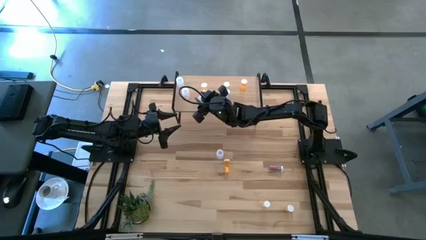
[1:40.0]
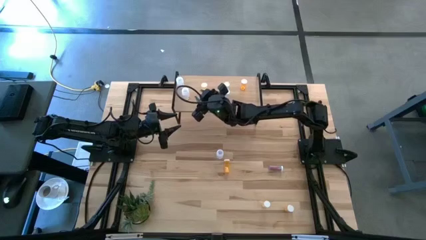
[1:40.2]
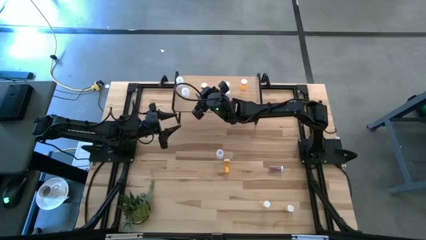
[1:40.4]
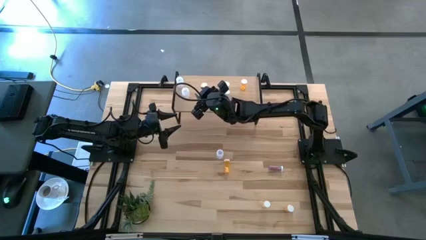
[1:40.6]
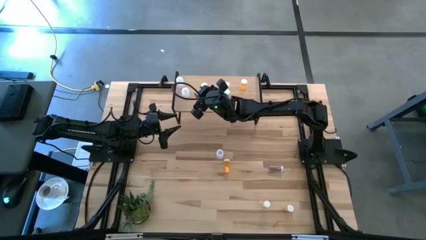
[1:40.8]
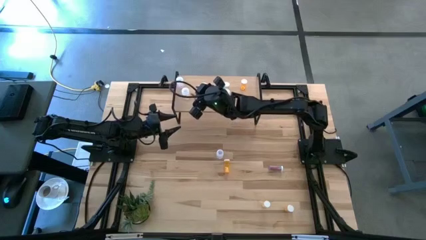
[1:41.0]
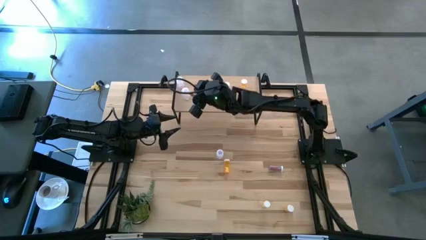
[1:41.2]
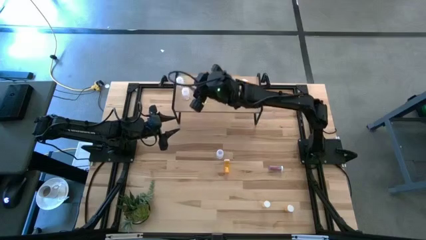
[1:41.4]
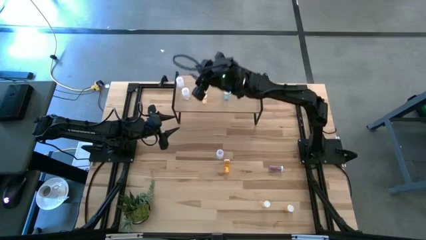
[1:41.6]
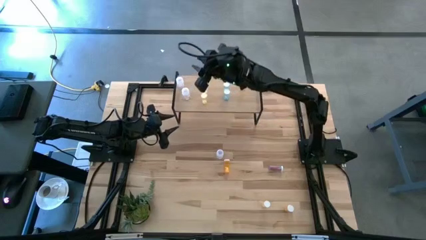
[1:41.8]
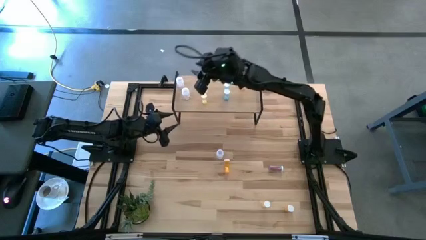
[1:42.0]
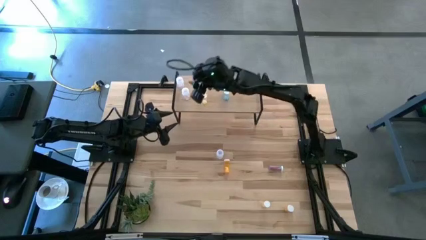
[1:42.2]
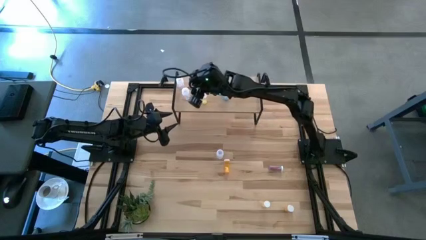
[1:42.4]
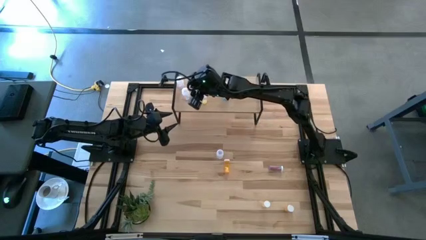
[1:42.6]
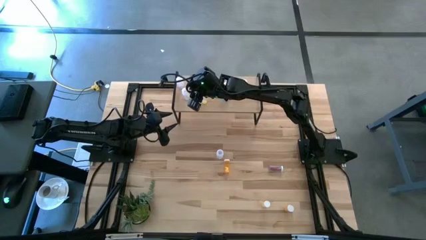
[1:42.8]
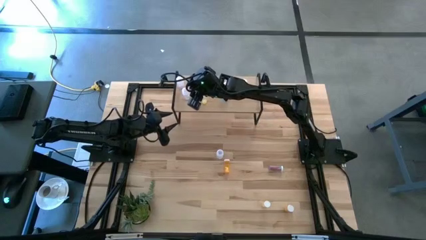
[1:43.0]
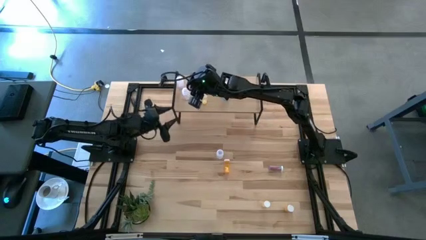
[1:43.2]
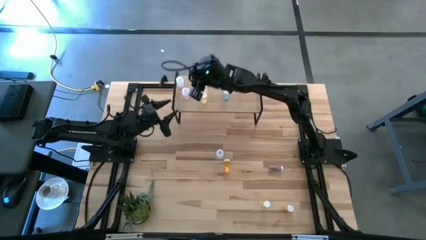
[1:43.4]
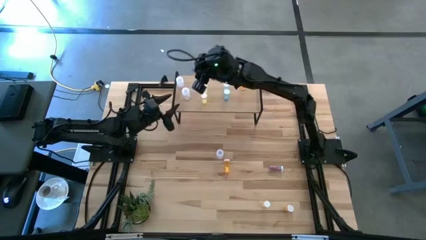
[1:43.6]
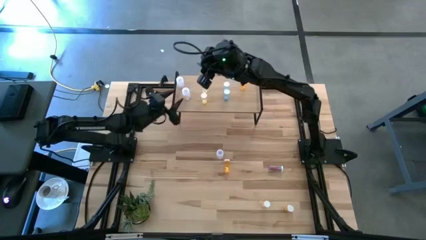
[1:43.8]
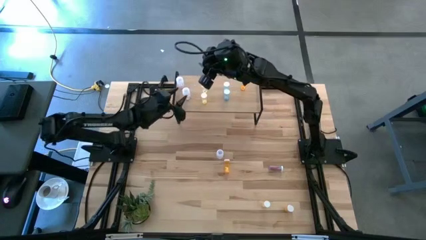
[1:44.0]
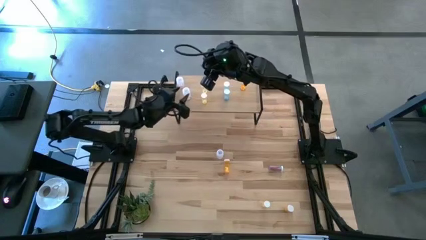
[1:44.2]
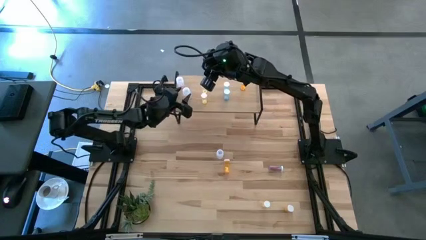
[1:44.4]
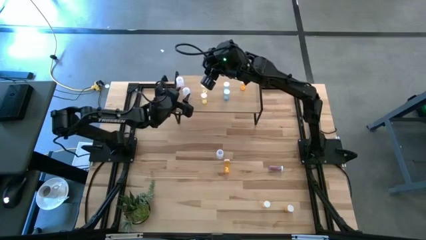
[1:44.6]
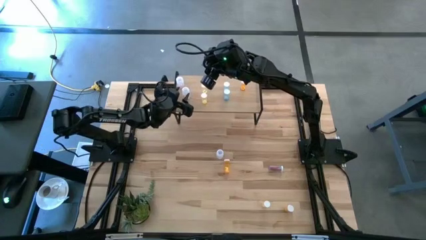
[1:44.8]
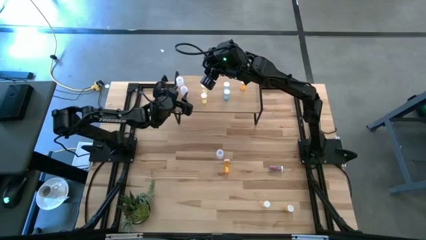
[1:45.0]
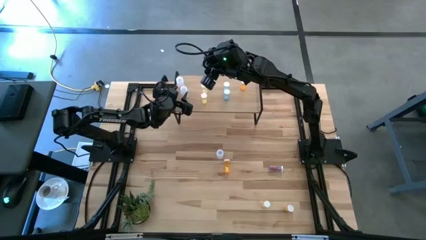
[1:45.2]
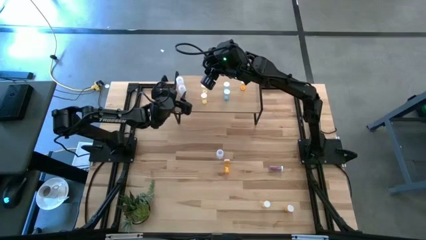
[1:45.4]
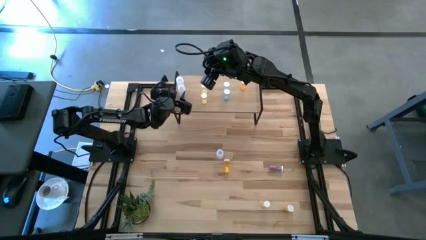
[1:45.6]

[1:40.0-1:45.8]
Task: Pick and place medicine bottles onto shelf by color
Adjust the transparent pill bottle on the shelf

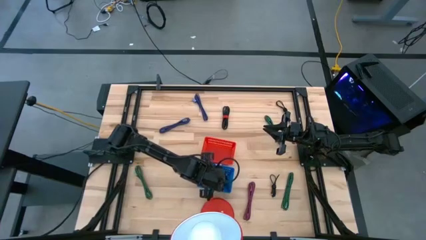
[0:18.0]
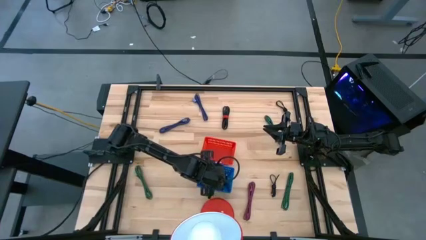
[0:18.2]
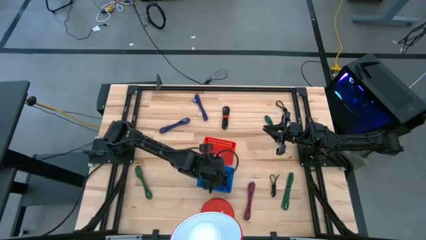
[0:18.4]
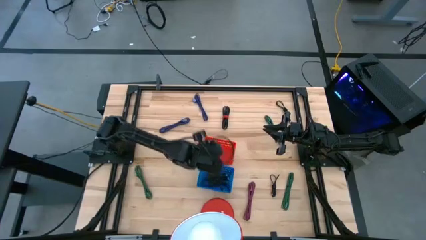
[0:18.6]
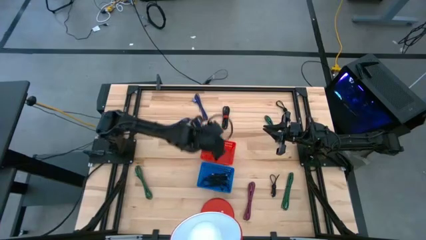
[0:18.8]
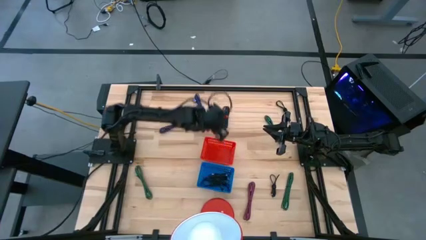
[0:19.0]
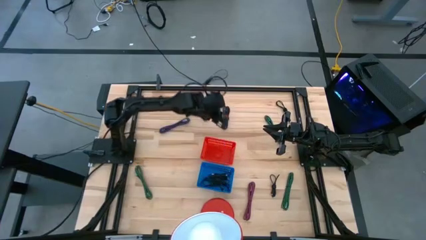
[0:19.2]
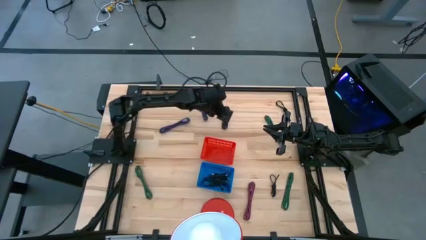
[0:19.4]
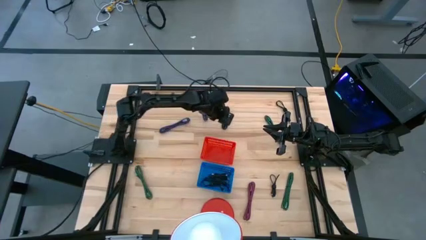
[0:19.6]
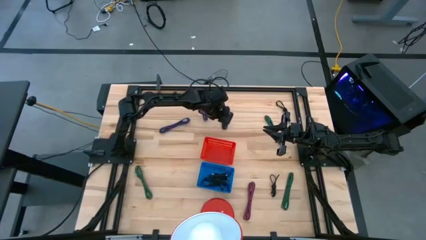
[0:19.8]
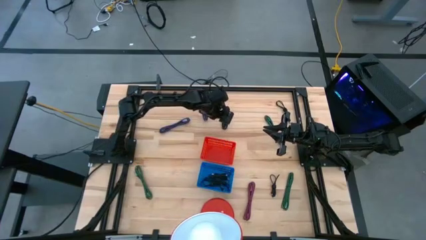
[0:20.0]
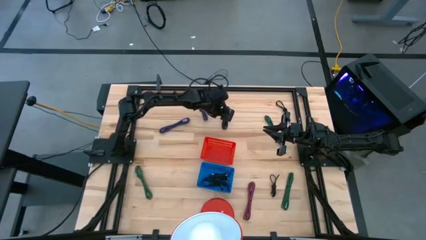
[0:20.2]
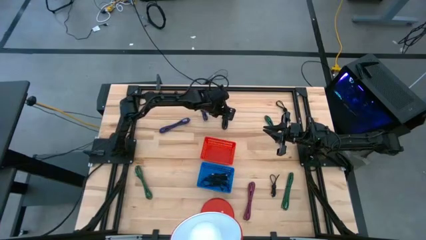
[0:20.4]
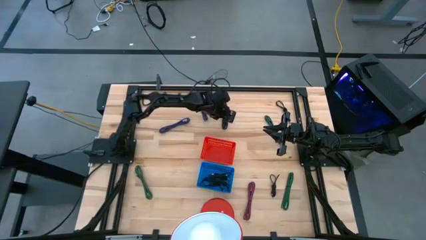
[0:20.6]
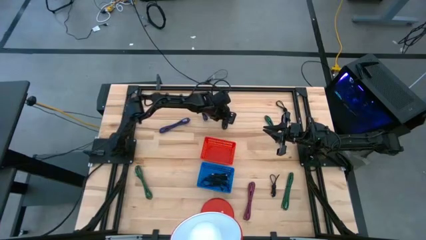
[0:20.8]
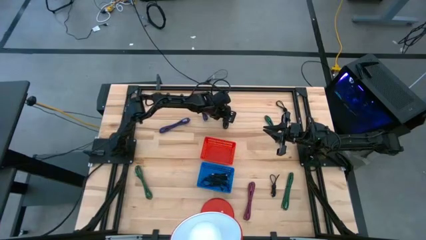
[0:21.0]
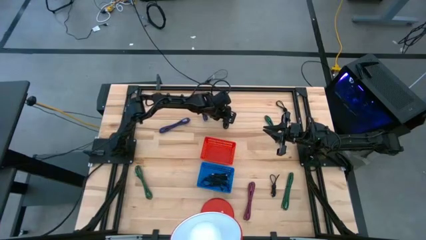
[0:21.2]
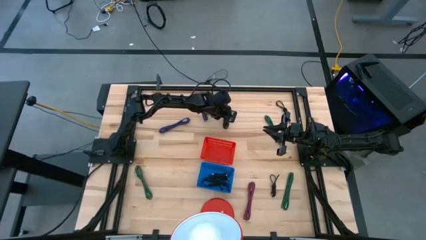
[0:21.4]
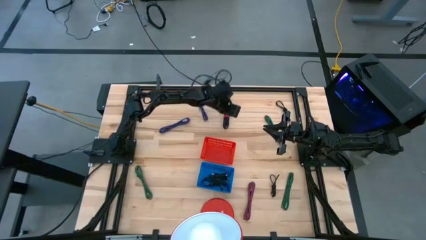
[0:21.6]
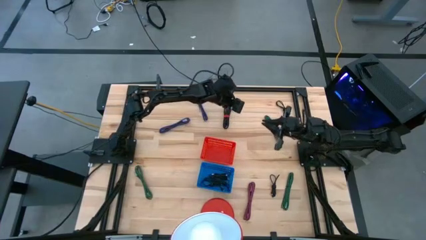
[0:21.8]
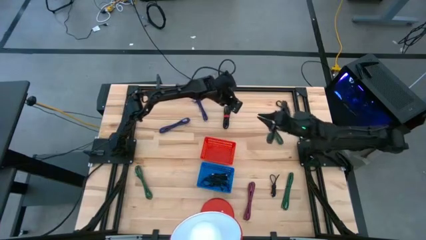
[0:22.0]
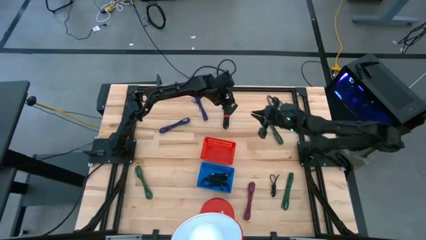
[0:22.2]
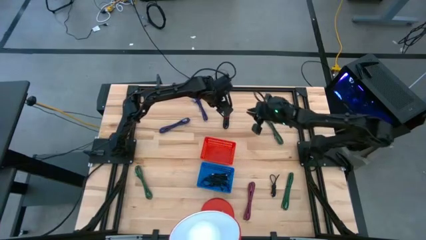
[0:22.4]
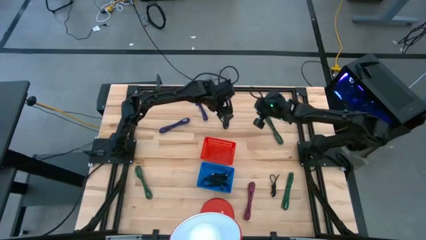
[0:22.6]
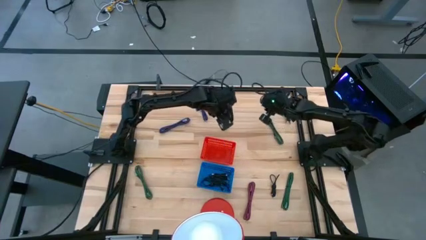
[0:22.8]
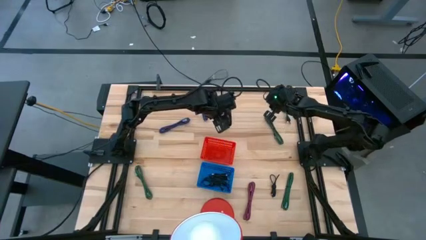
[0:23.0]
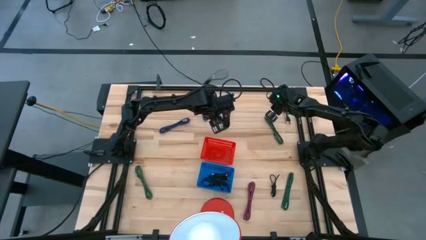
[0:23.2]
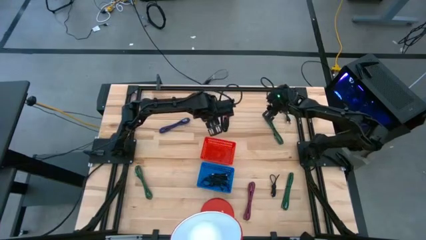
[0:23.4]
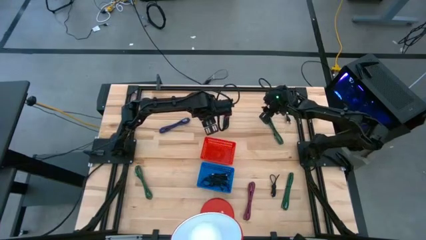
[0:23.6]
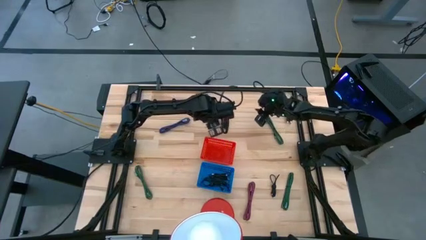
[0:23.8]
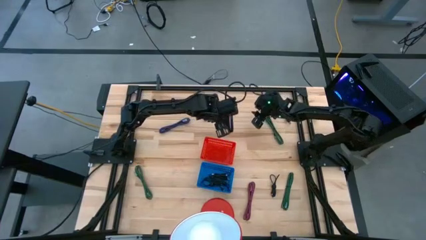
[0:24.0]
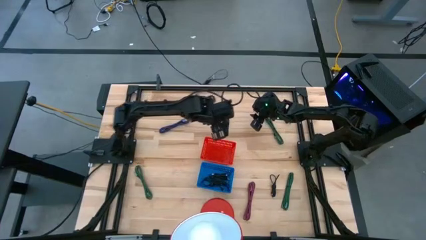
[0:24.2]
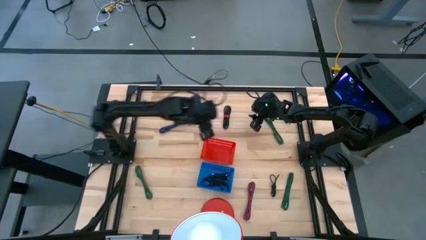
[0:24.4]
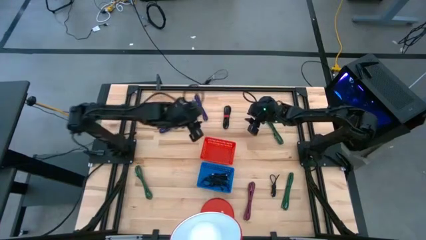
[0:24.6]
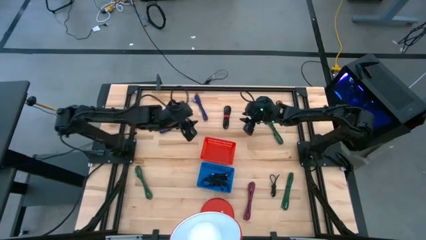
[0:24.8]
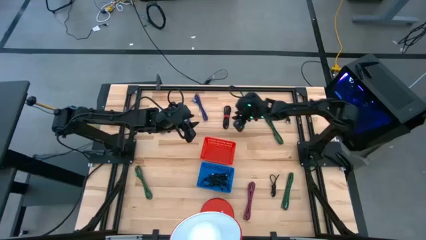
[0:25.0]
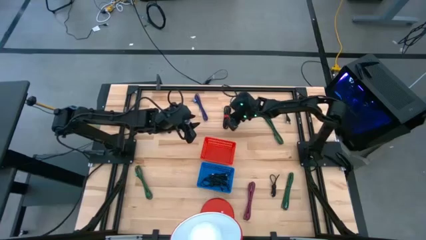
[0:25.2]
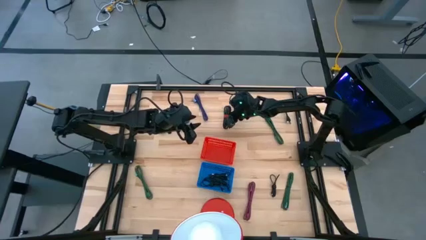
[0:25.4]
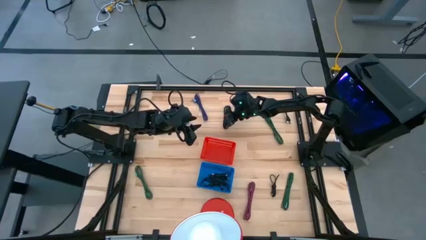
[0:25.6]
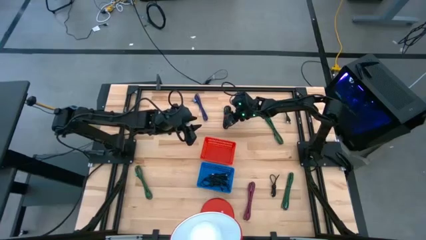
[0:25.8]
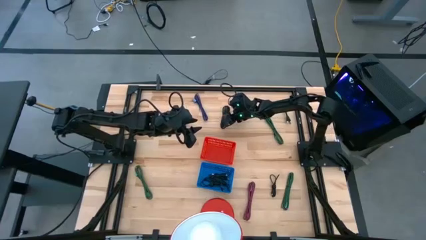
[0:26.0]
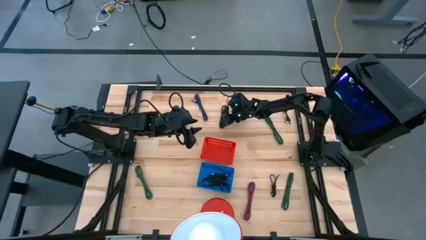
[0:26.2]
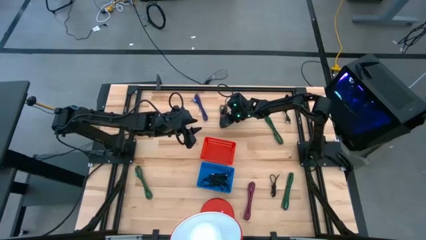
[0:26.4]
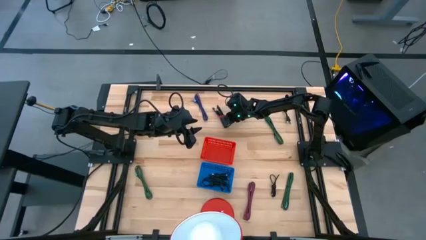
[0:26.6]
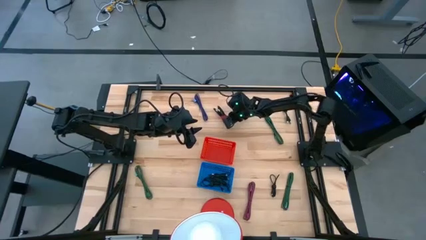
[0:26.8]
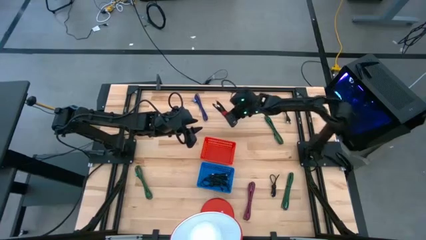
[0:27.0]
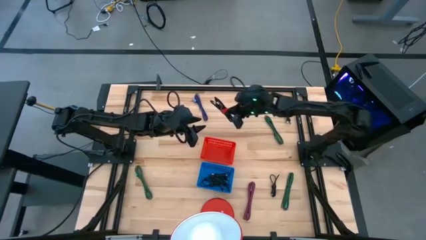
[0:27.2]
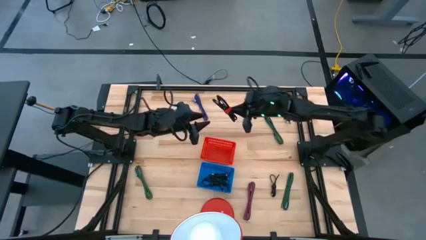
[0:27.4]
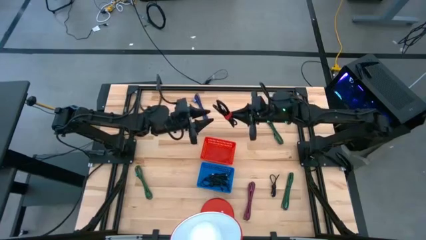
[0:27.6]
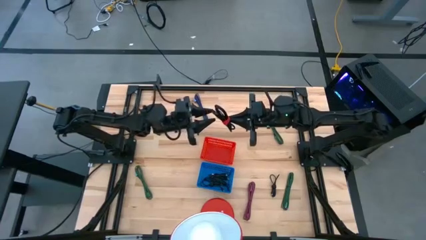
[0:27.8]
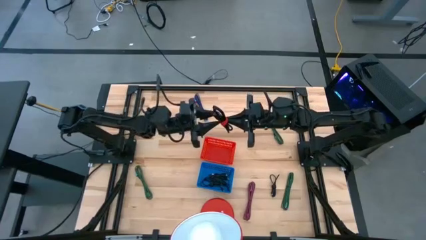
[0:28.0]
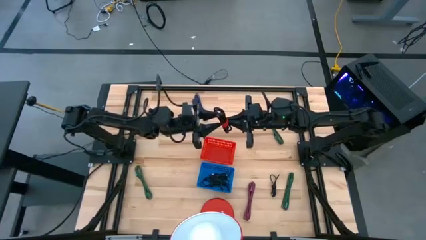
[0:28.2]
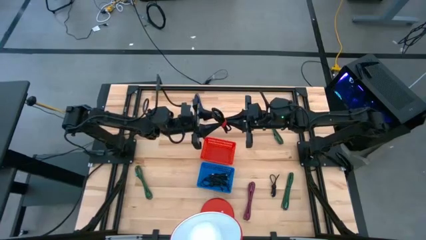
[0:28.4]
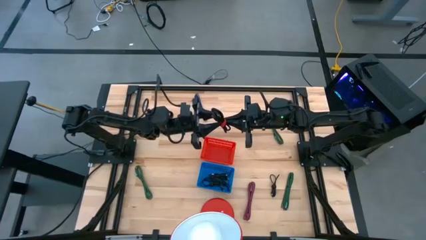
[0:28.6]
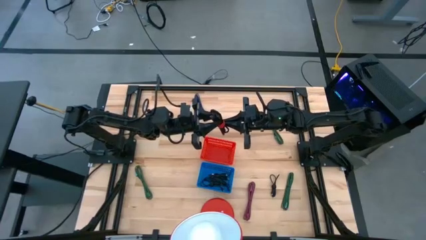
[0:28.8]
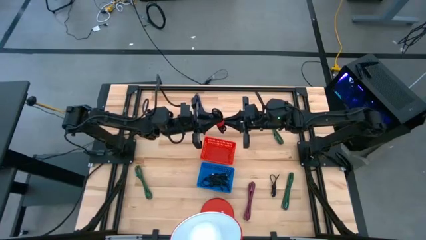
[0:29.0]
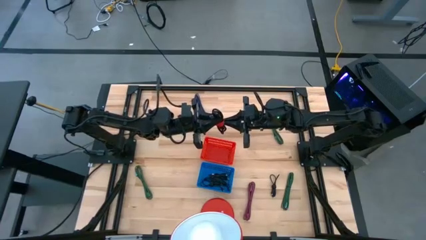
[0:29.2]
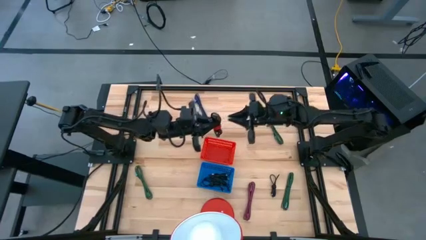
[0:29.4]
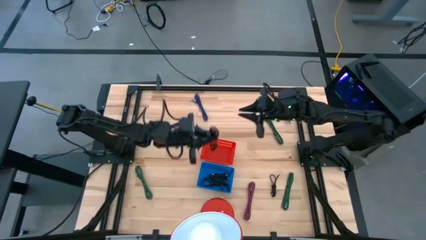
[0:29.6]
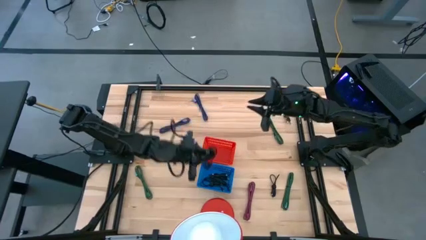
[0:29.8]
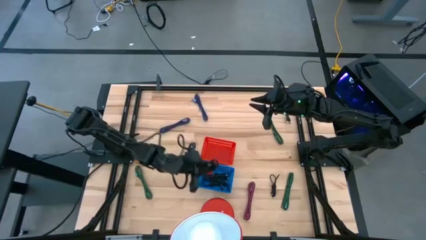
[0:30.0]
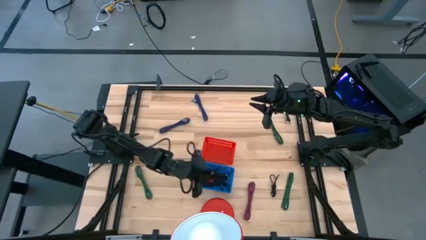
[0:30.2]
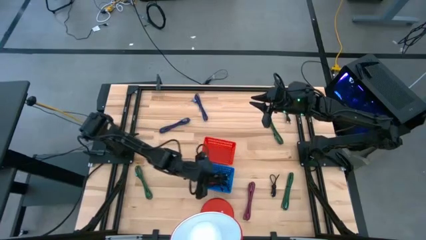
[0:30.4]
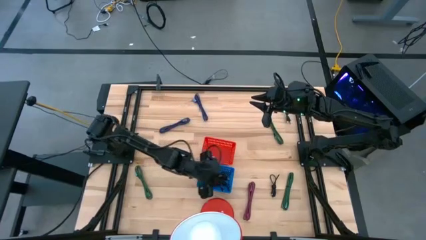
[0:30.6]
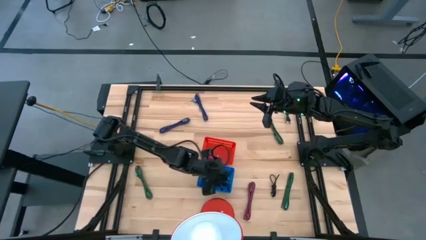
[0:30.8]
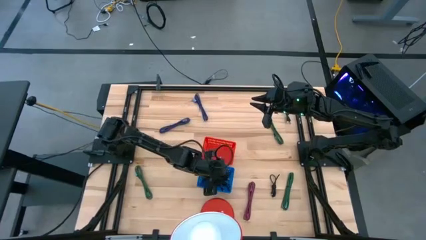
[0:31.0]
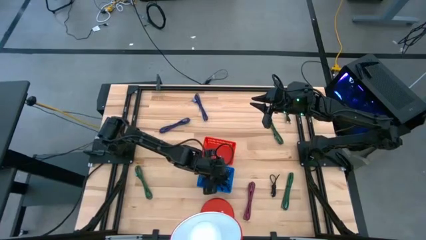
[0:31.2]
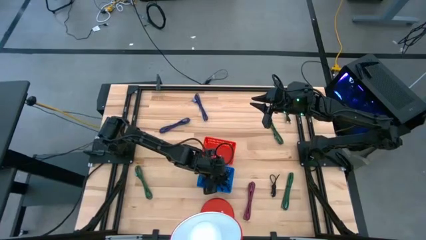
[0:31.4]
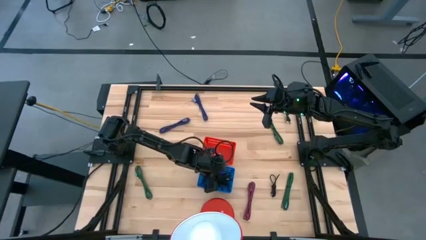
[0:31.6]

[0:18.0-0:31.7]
Task: Pick & Place USB Port
Put the small black USB cable into the blue bin
